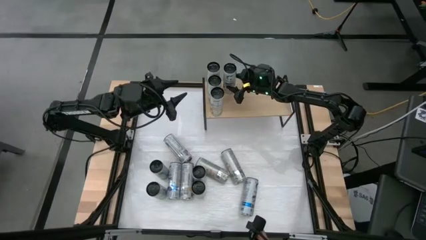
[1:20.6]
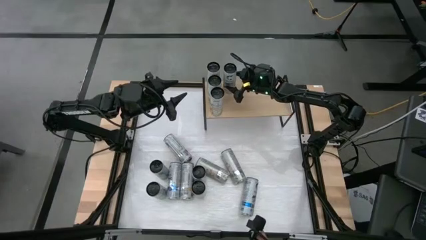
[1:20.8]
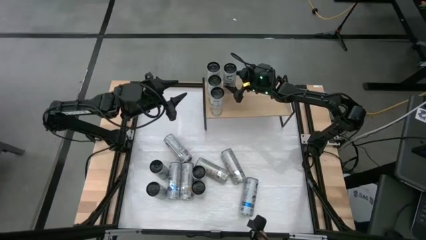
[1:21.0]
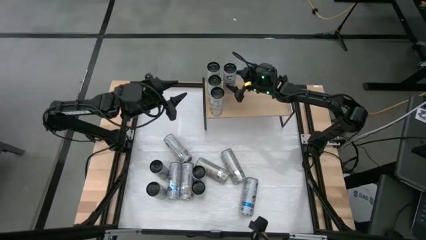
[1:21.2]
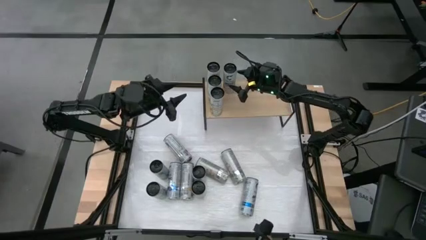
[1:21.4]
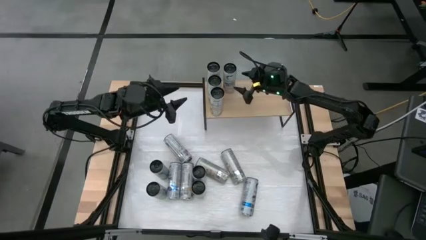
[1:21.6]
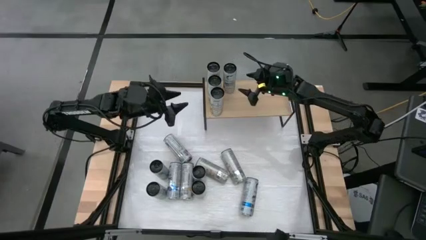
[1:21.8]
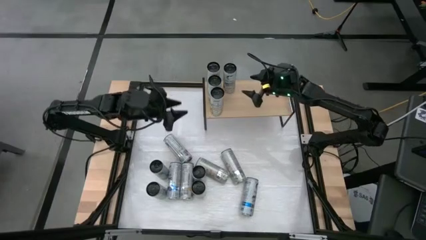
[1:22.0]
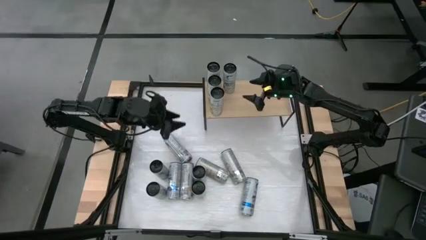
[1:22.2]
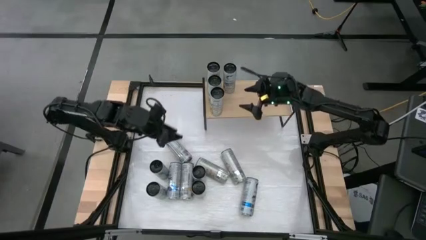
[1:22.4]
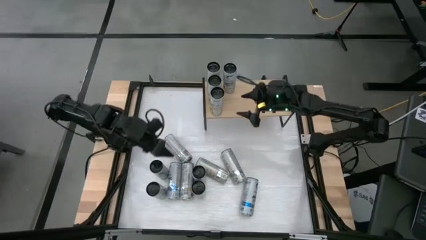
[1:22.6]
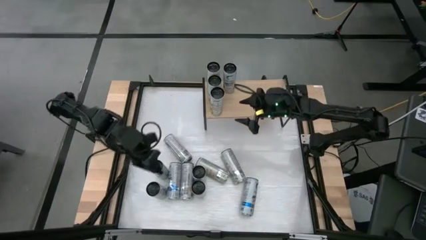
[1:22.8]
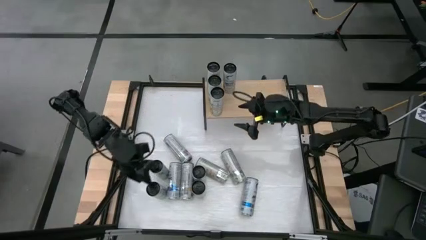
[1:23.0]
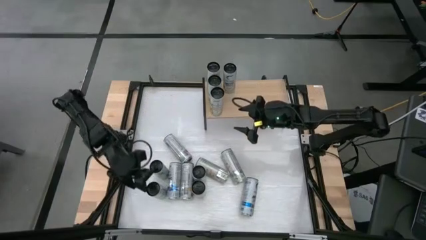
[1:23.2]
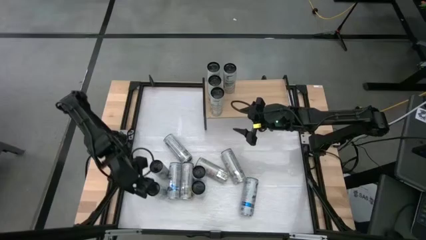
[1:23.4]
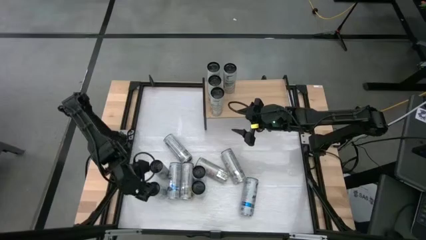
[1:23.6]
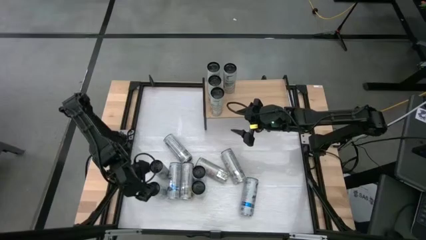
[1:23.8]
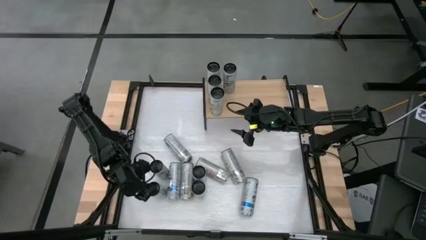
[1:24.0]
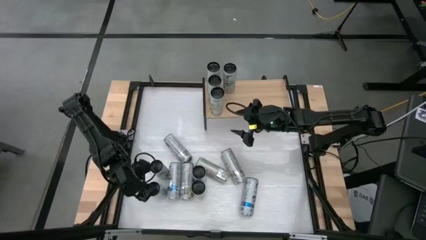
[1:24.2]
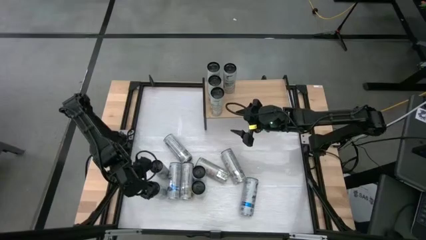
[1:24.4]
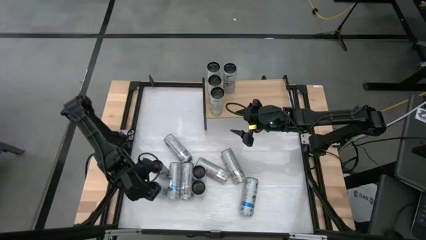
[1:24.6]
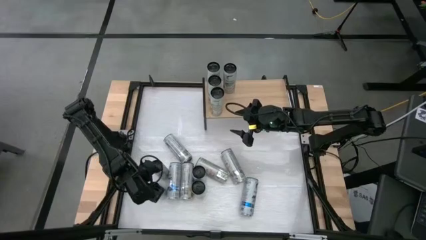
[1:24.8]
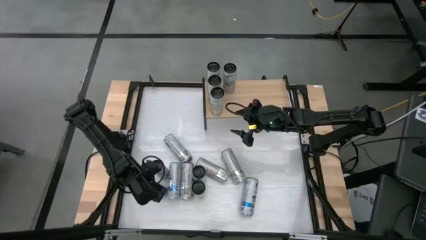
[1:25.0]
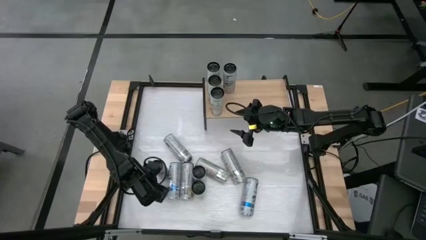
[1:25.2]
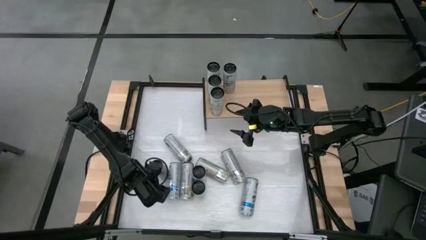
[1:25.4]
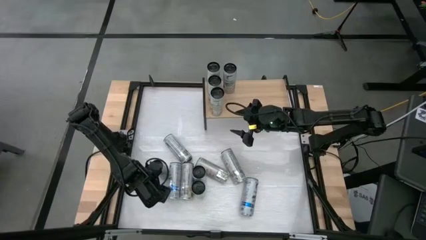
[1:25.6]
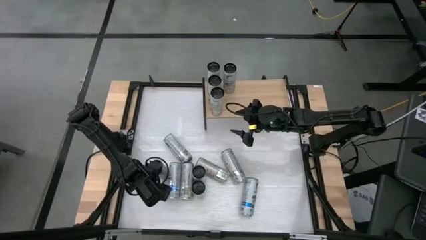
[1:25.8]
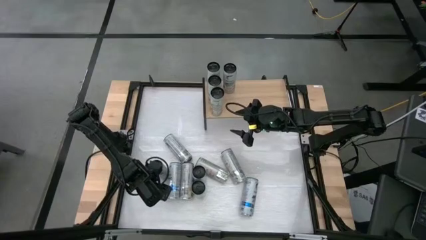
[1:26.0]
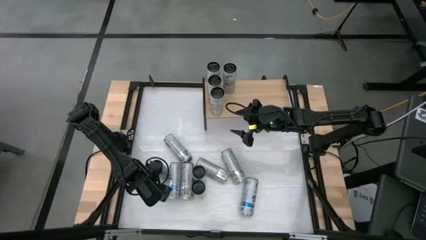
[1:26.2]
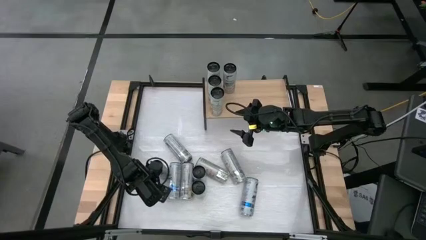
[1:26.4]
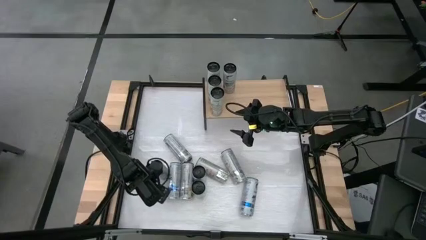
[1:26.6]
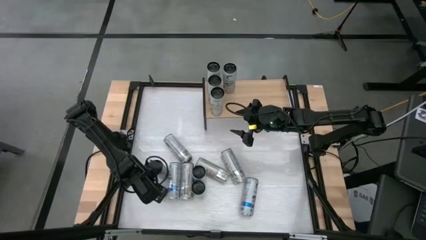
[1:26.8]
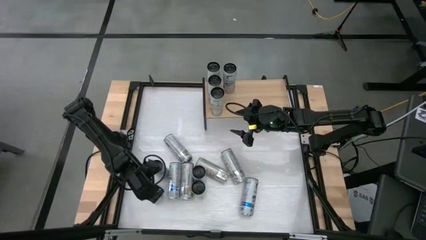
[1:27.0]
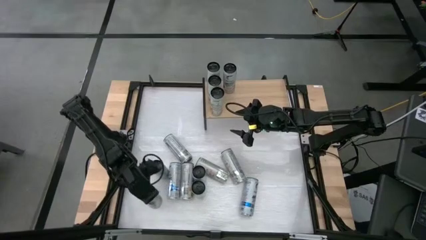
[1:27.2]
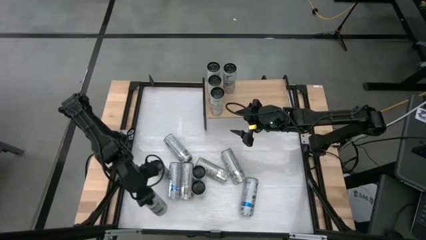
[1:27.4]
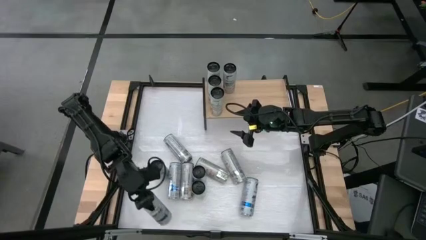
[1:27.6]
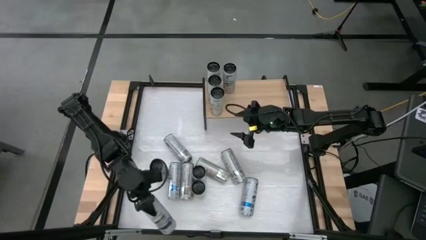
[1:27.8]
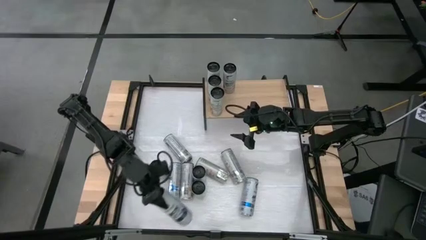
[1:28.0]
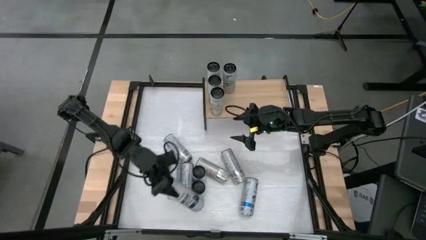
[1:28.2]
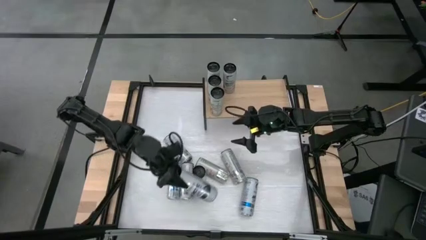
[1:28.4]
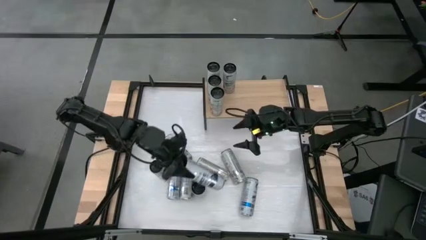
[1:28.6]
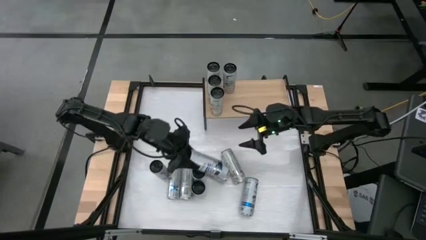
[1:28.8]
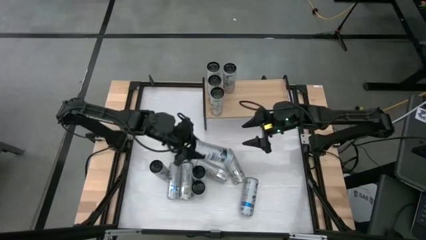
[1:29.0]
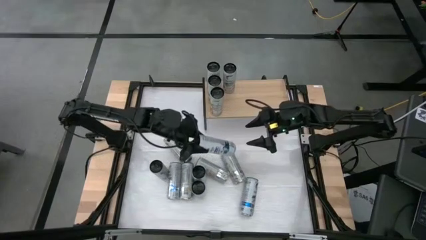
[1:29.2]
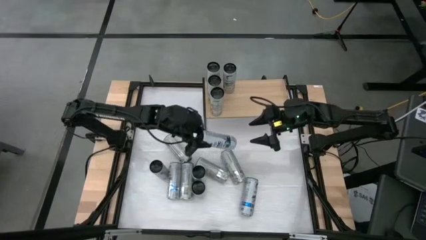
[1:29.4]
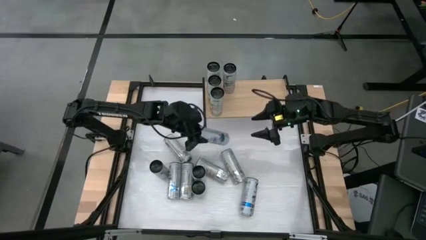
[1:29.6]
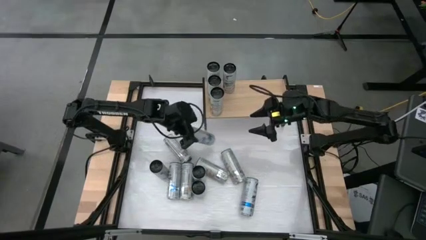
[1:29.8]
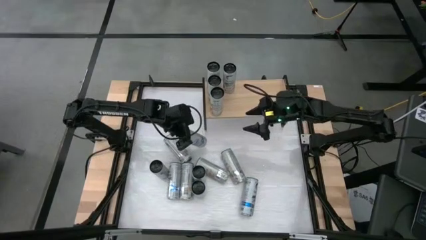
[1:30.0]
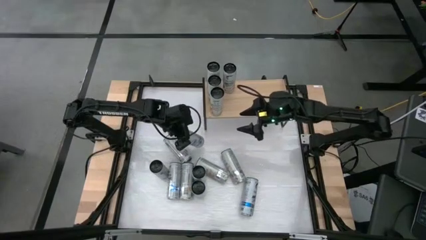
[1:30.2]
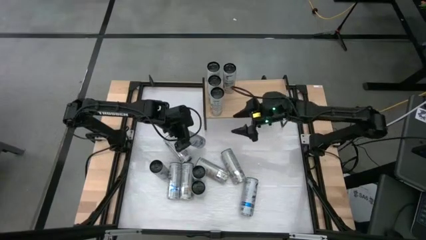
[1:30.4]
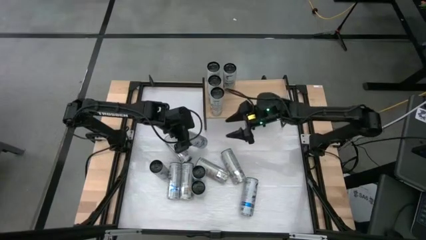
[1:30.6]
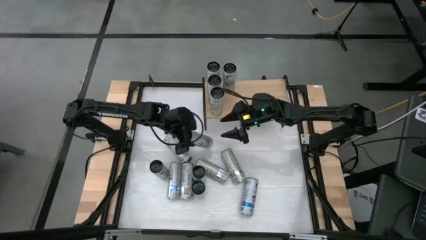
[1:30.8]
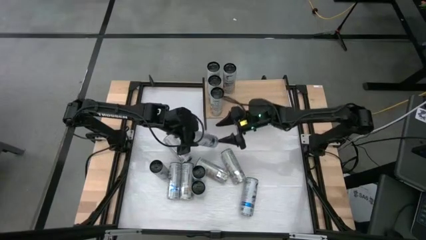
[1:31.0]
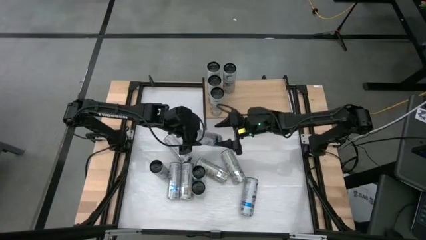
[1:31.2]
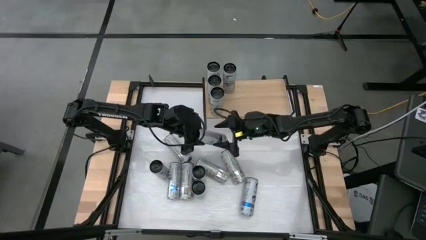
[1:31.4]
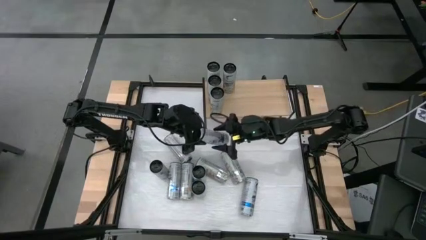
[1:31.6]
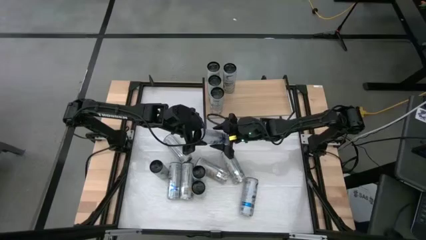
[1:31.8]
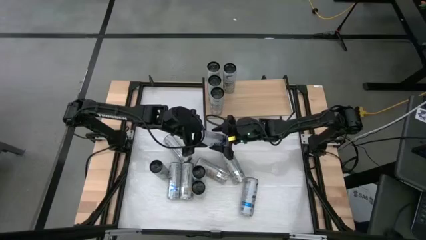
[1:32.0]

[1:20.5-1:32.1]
Task: Place canned beverage on shelf
Put the blue soda can on the shelf aligned with the other blue soda can

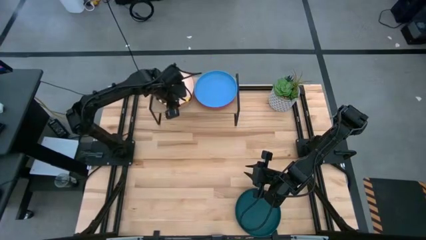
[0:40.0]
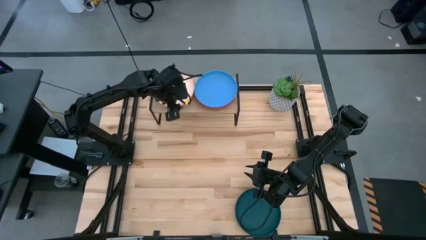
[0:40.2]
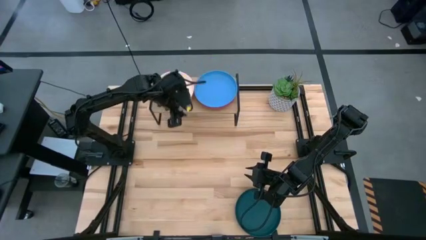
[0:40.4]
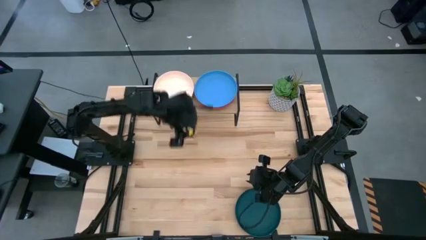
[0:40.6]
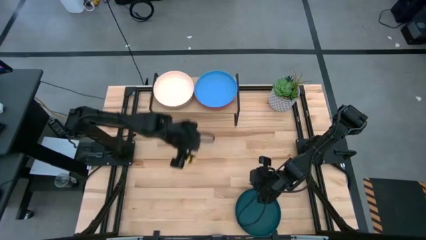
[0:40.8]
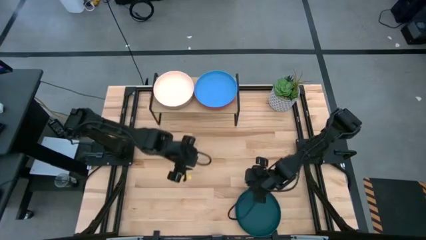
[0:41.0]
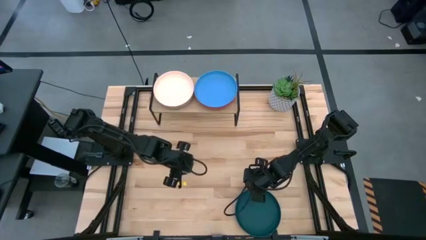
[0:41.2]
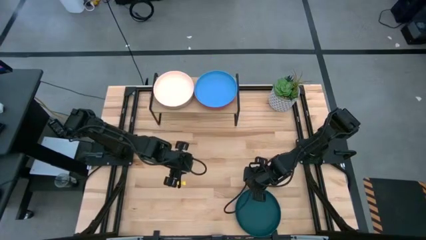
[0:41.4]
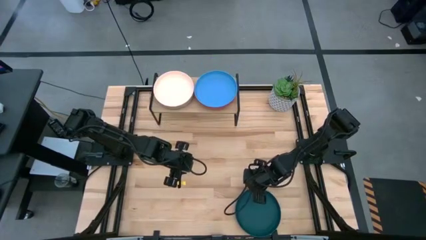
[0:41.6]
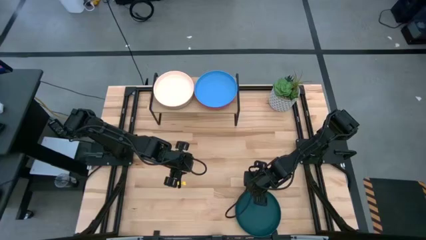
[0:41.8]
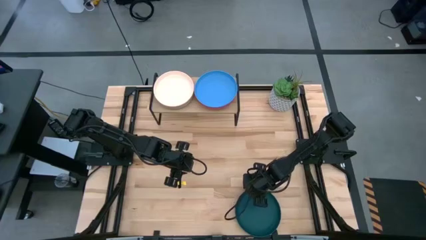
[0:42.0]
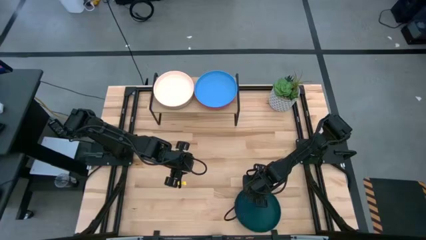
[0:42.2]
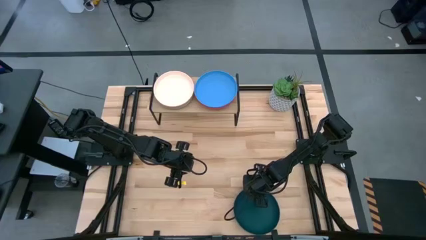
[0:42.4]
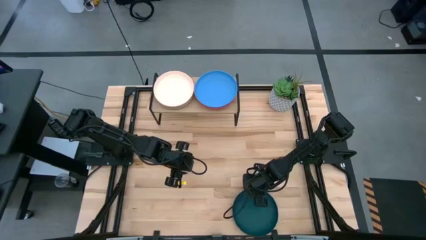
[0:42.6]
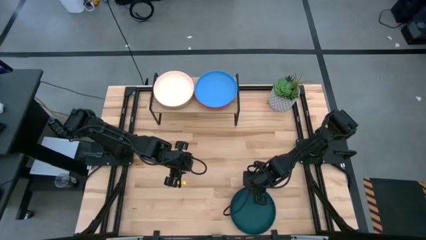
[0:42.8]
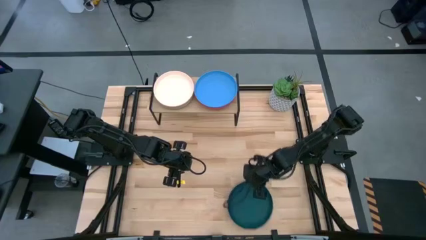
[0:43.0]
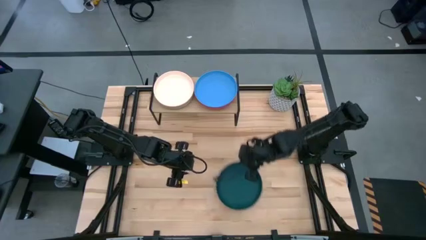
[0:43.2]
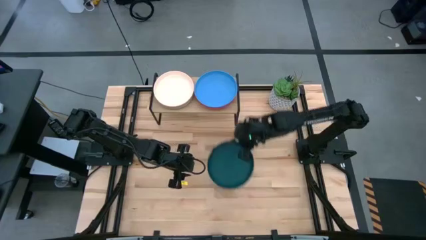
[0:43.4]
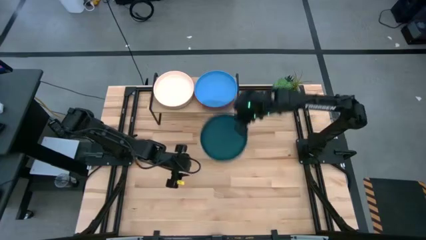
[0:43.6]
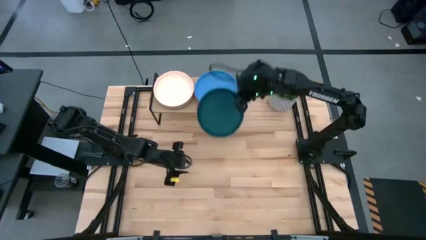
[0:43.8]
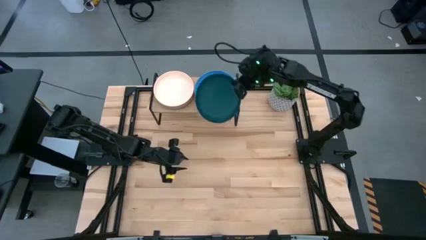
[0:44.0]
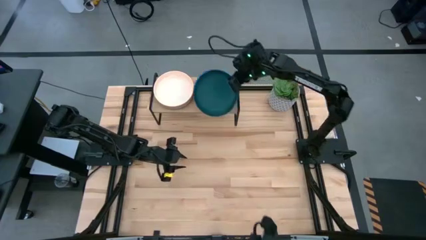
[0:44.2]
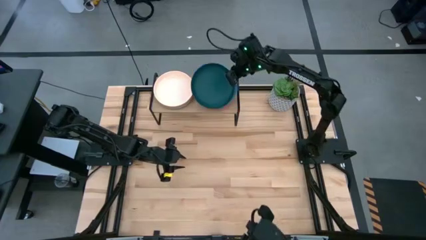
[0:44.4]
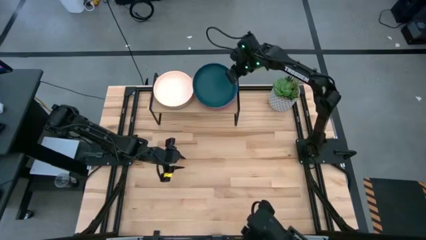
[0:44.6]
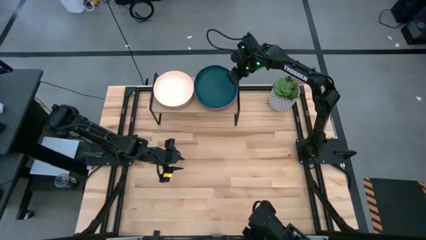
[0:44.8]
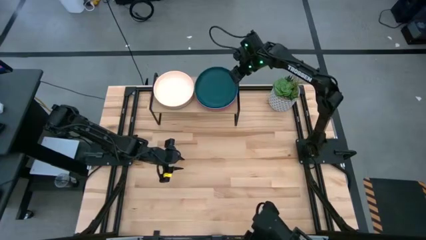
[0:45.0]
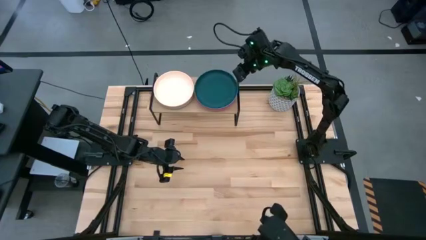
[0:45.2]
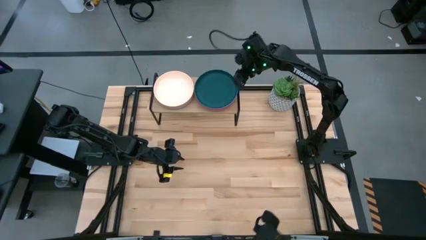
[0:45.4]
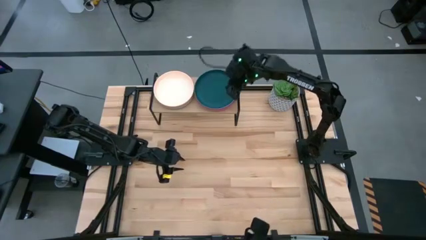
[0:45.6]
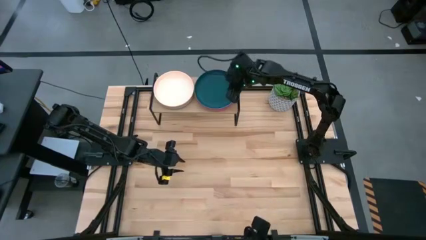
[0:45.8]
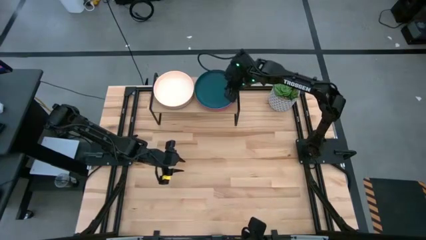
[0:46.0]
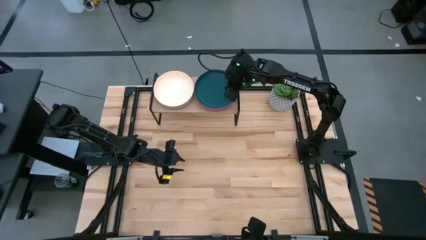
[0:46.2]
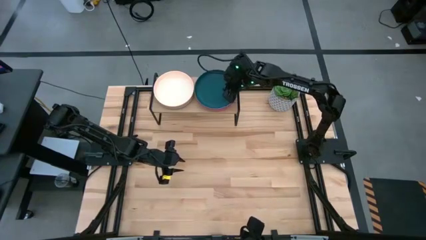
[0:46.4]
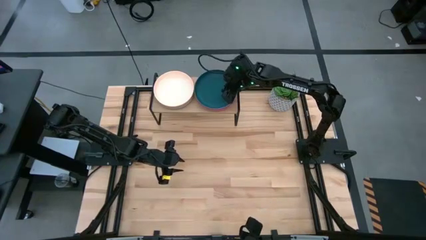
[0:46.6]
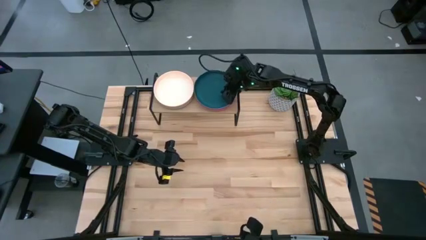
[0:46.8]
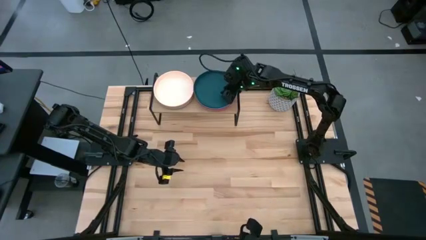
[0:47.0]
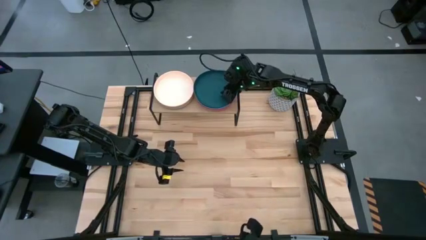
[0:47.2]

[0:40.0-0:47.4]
Task: Place and stack plates onto a shelf
Stack the dark green plate on top of the blue plate on the shelf
